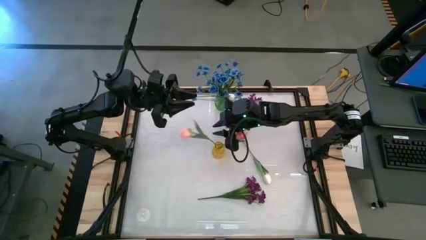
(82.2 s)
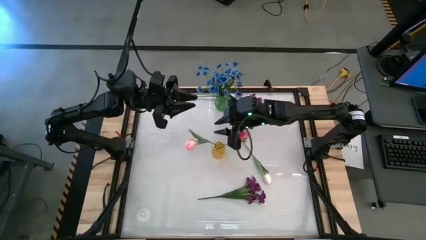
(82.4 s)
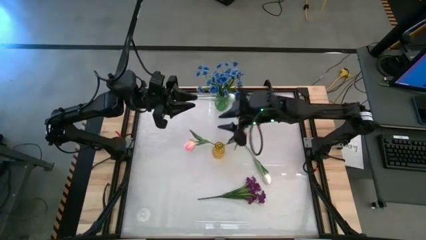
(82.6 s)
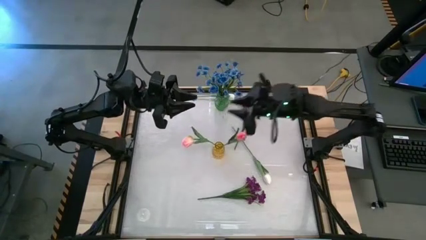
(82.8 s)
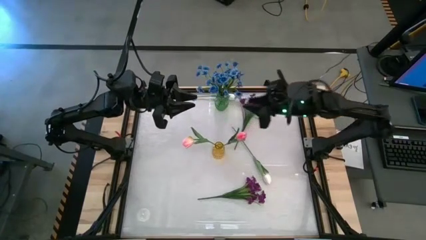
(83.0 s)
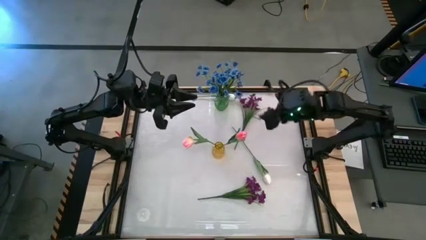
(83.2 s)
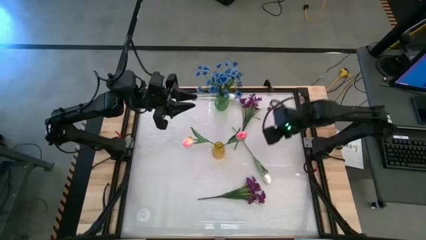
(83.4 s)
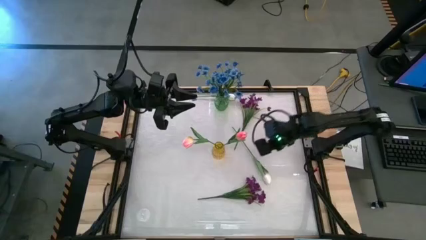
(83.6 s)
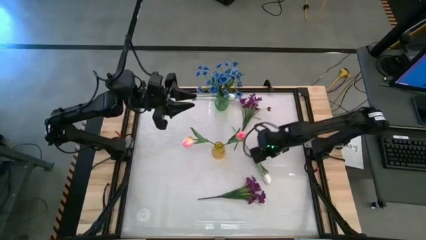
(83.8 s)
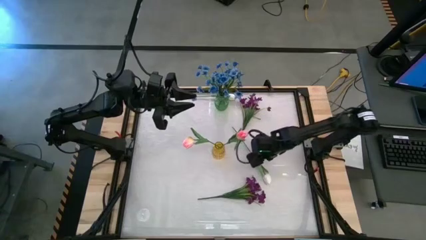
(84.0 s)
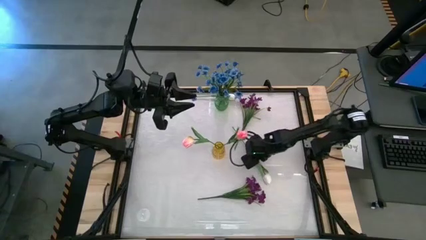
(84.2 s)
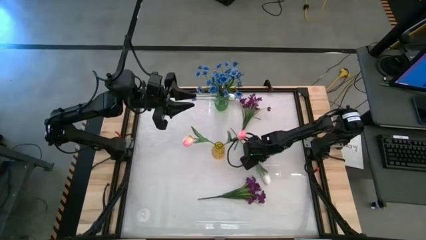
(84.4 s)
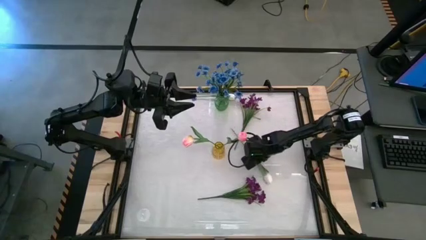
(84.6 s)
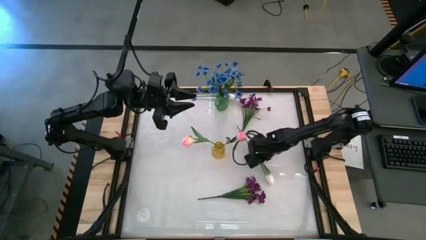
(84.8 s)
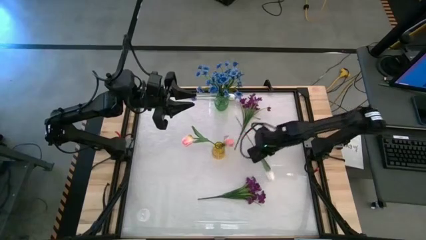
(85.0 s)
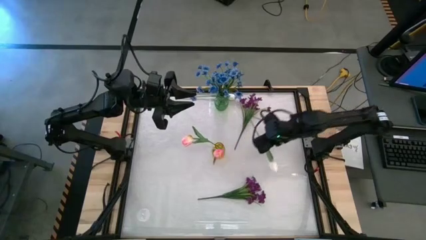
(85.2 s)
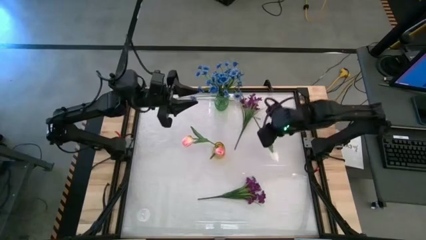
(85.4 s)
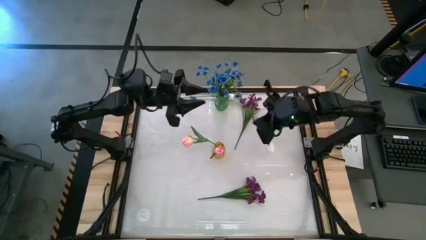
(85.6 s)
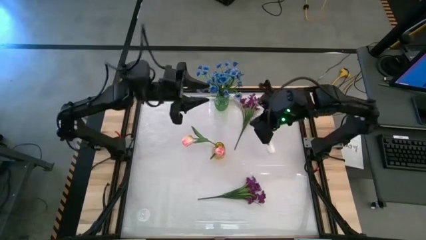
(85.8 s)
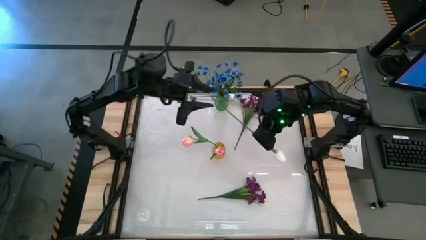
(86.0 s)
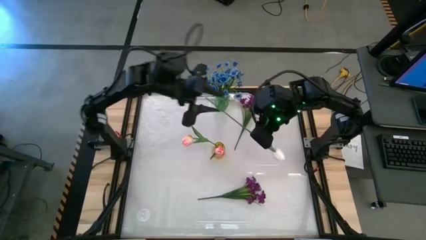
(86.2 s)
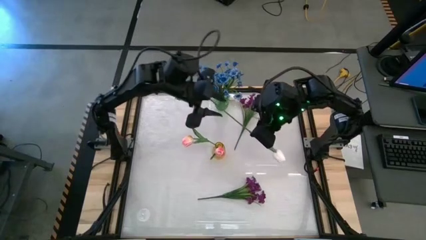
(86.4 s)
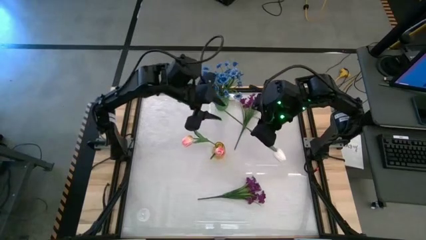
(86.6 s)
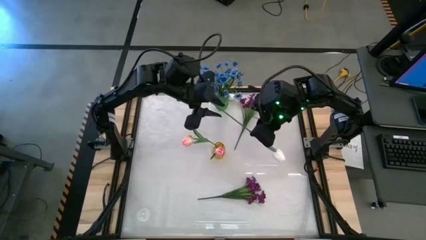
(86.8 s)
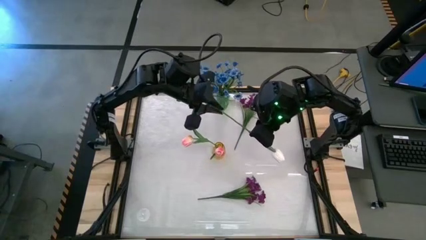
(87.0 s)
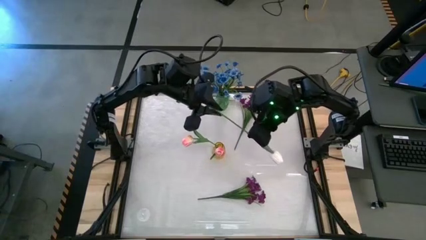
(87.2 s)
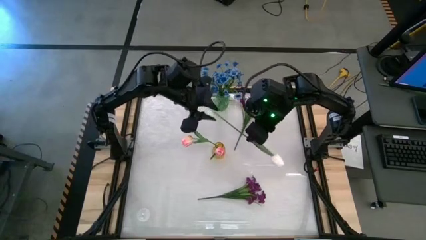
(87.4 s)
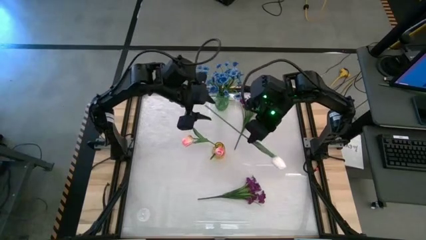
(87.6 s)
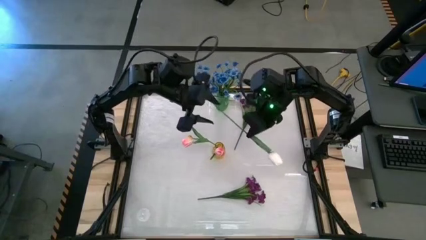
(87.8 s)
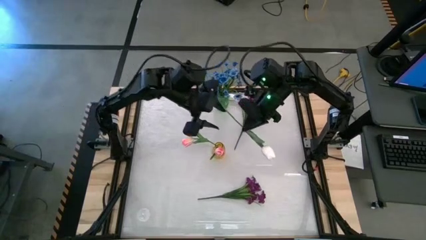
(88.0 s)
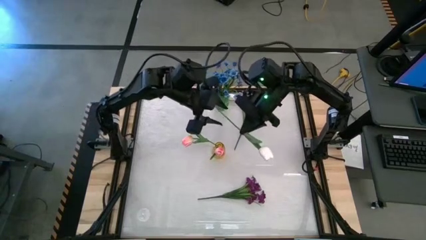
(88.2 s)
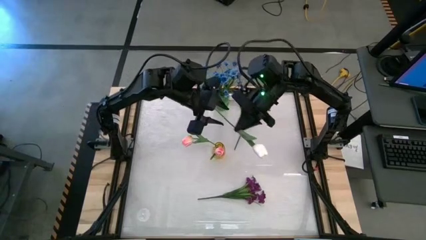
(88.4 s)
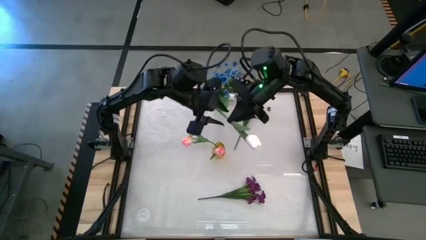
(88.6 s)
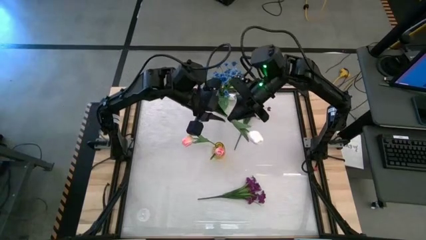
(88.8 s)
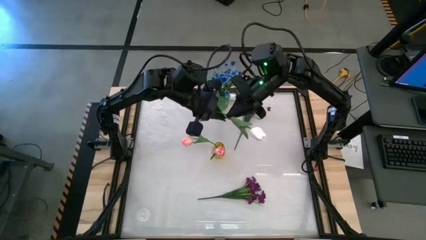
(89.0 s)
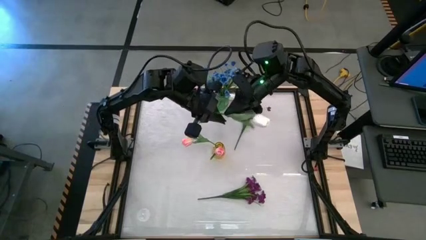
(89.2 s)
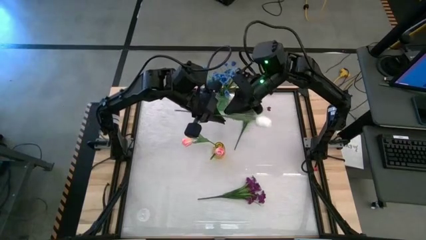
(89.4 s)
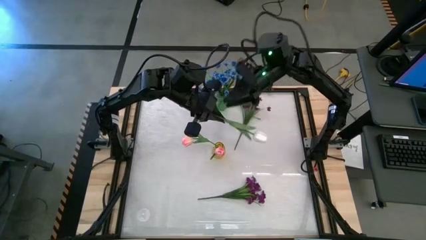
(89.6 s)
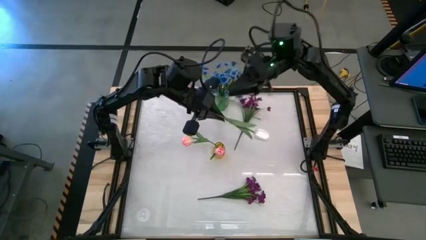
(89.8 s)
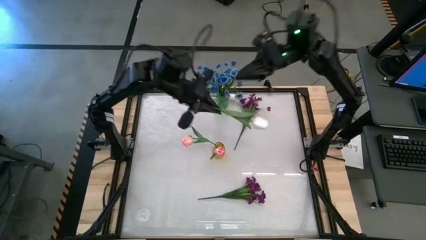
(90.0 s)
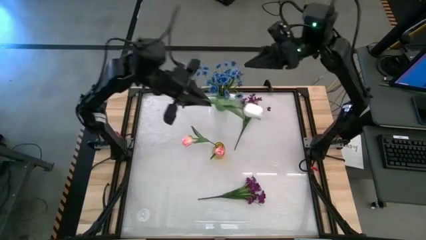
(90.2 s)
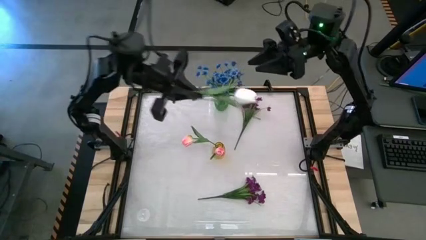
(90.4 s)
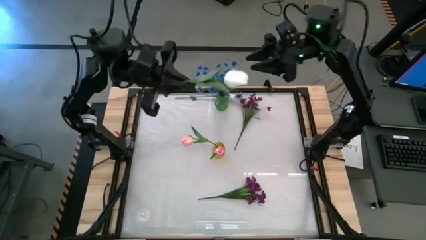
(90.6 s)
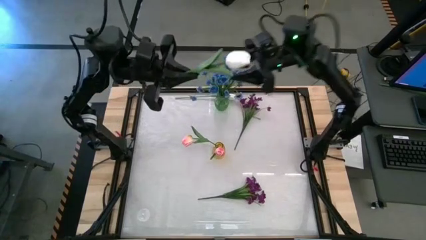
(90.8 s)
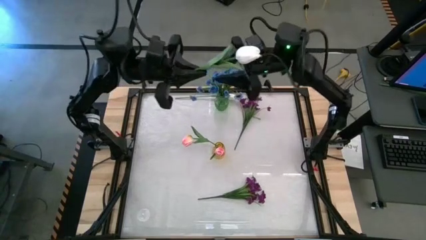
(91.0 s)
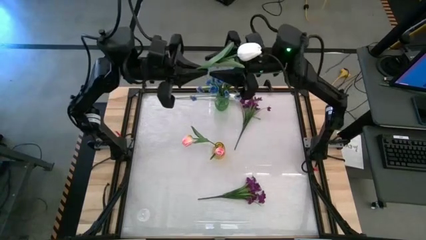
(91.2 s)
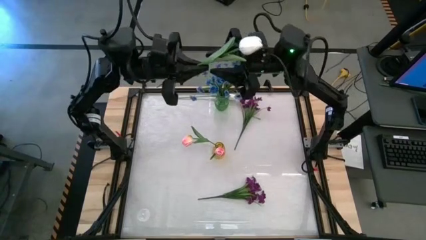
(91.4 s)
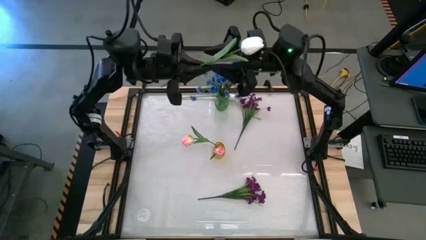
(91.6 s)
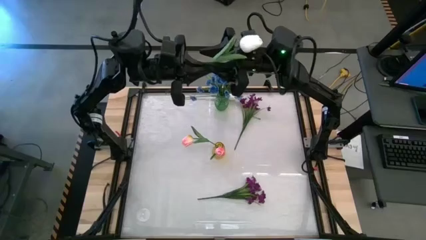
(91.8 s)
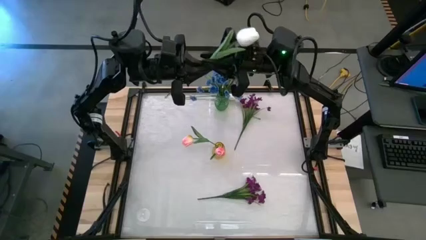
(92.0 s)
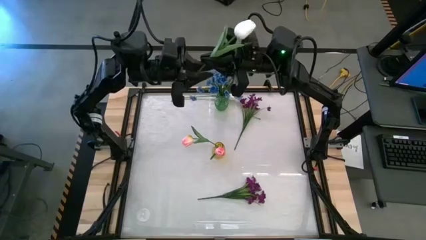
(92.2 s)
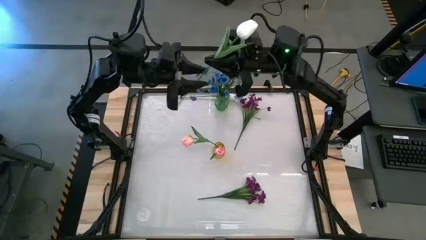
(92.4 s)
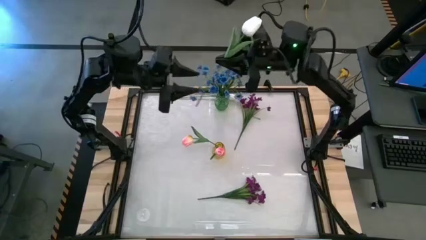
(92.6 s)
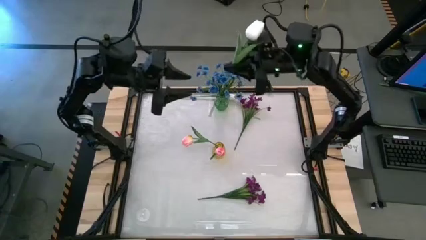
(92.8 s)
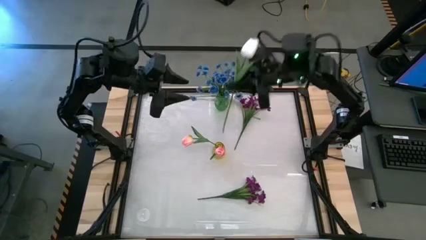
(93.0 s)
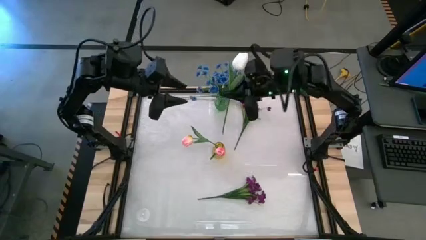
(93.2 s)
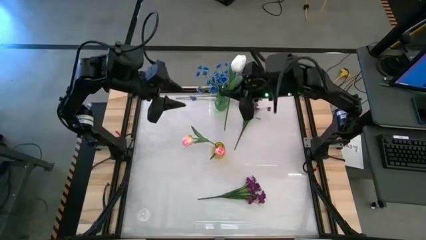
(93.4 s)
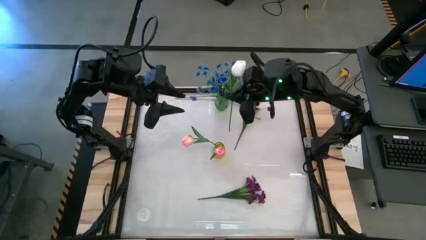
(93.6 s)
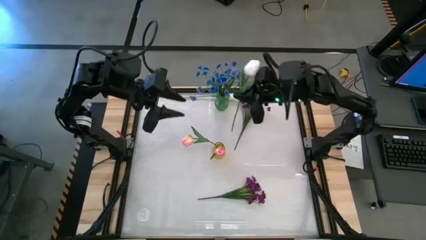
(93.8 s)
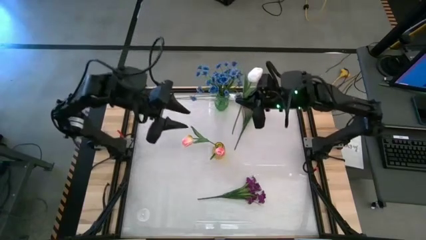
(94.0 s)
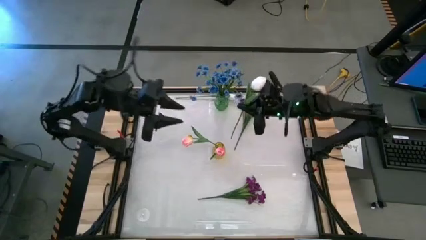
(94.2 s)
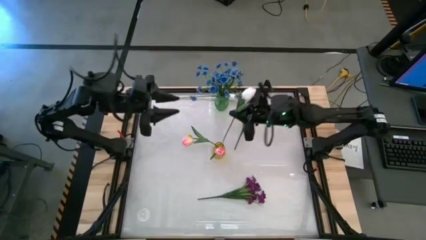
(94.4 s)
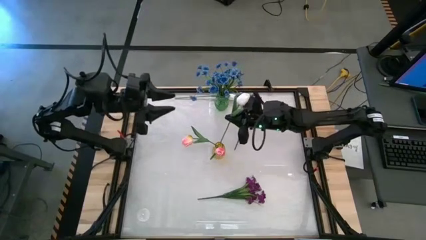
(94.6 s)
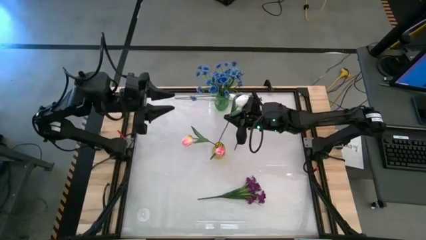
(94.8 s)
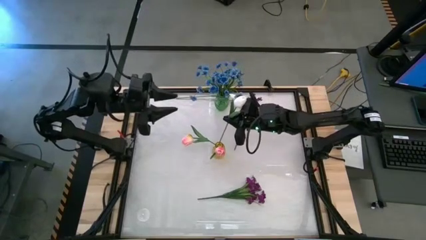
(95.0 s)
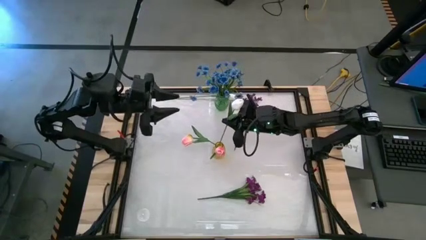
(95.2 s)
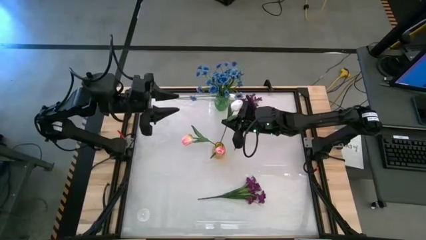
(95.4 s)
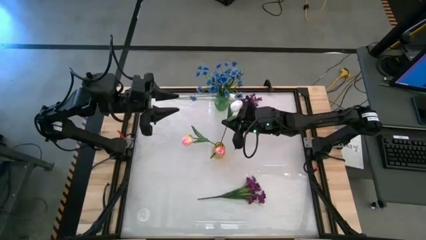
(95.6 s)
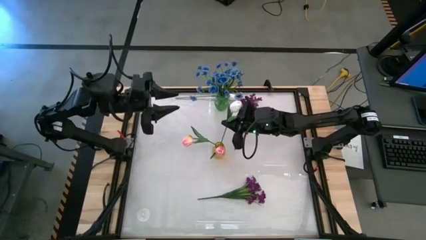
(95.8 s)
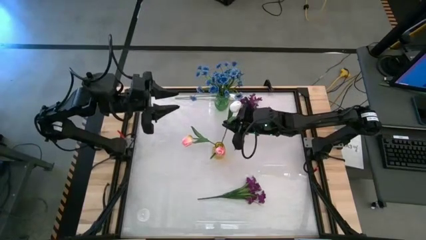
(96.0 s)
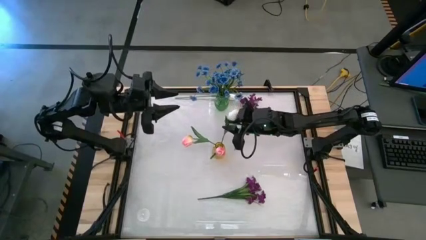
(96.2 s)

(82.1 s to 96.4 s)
Task: Sort flowers into vase by color
Put the bottom white flower into the yellow vase
